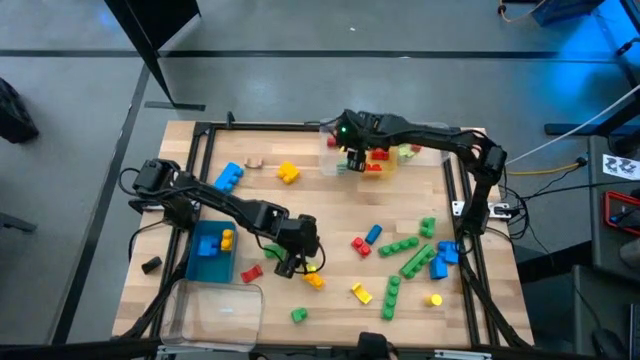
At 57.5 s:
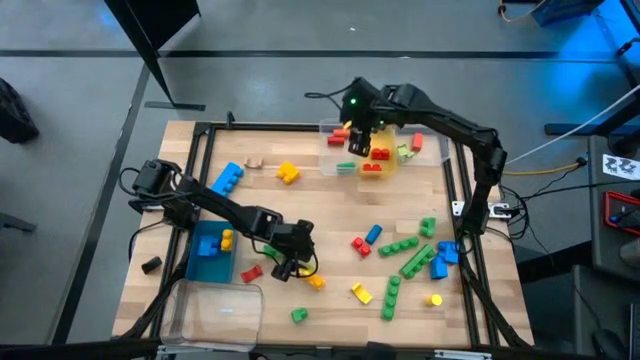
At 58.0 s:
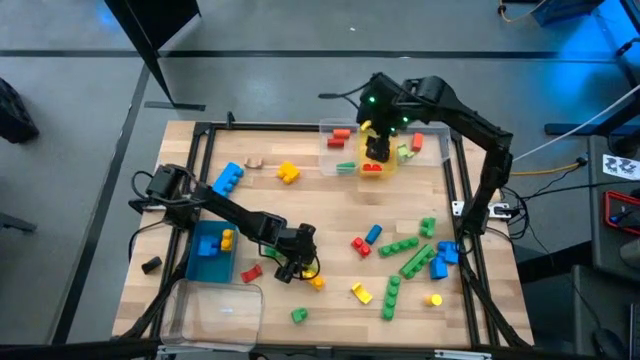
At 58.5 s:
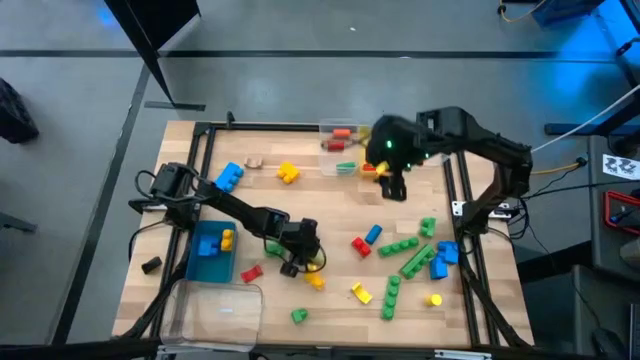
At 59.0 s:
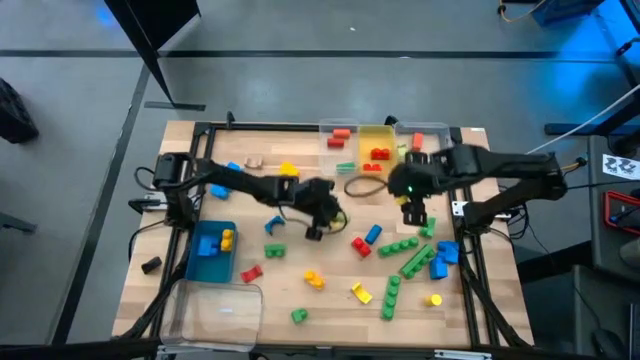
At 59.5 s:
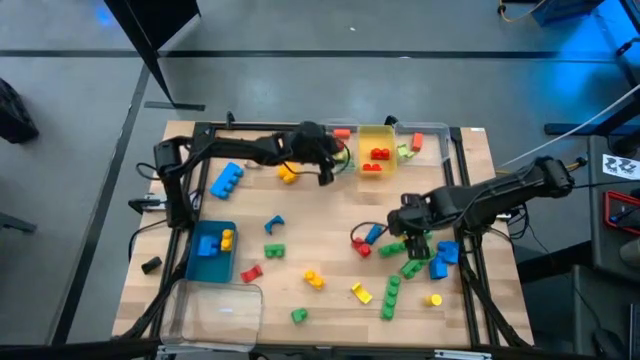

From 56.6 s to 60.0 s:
Task: Sort blocks by size
Put the light green cylindrical block into the top left transparent bin

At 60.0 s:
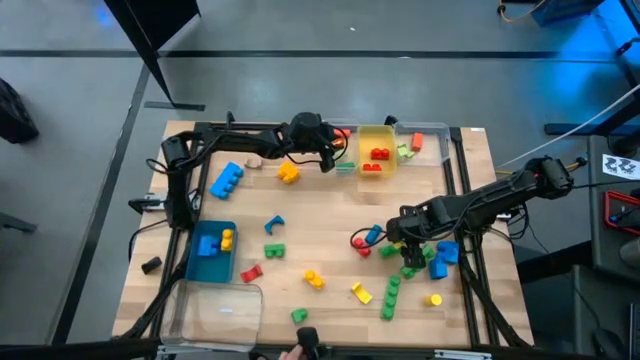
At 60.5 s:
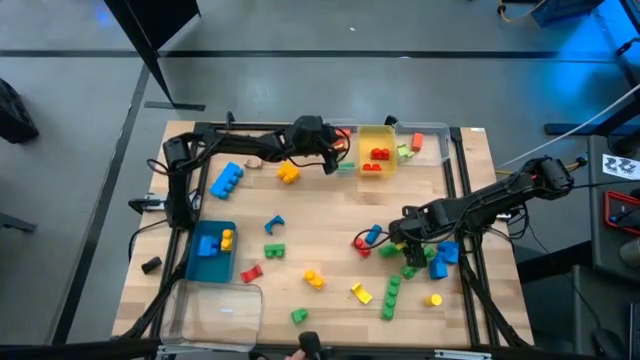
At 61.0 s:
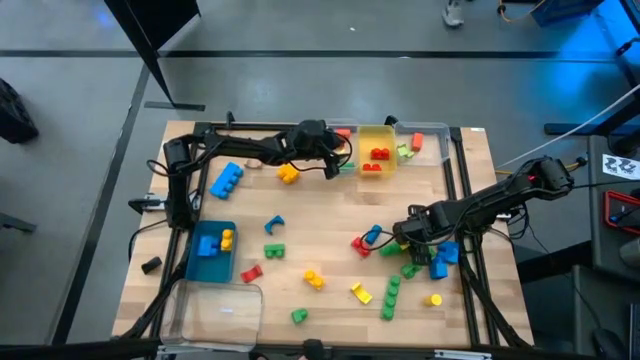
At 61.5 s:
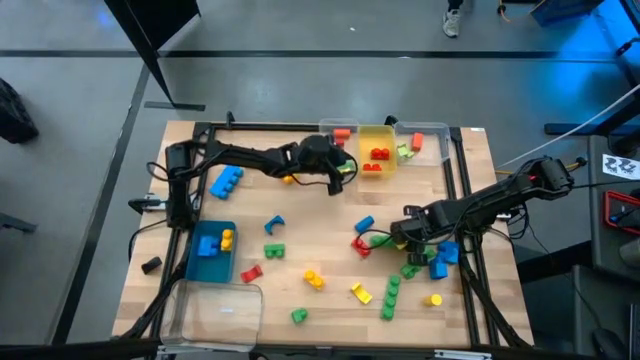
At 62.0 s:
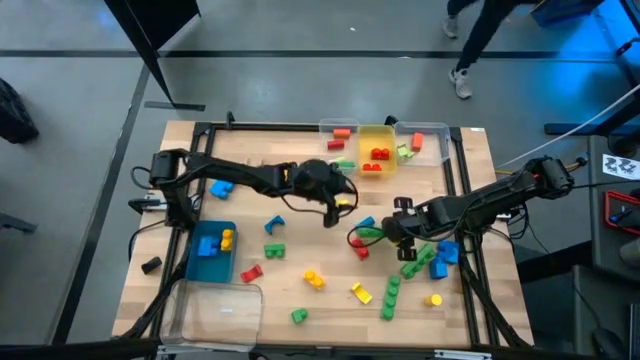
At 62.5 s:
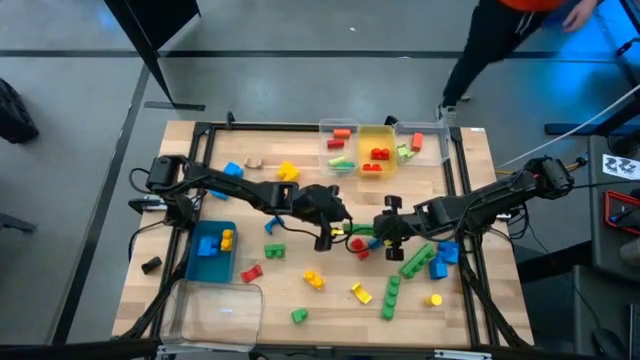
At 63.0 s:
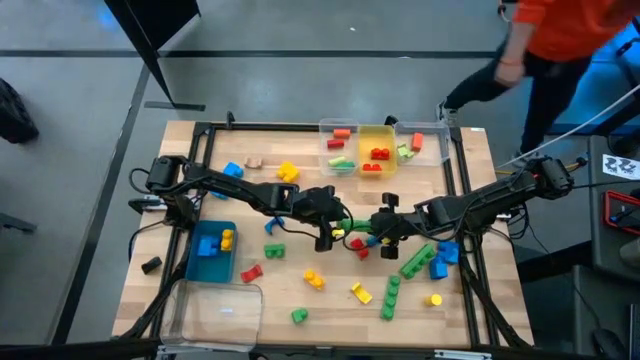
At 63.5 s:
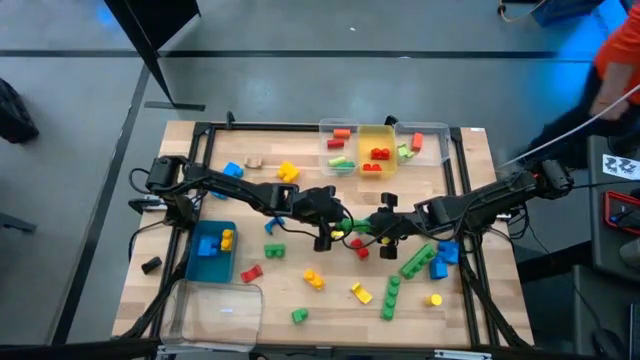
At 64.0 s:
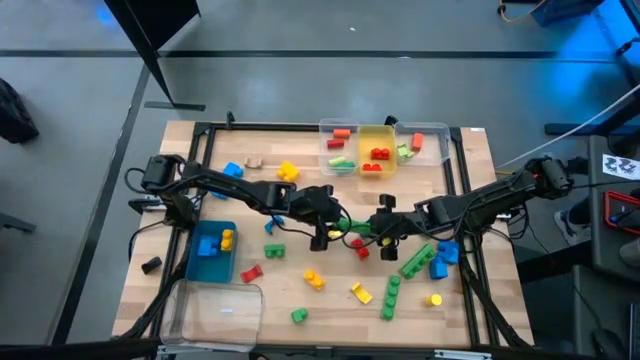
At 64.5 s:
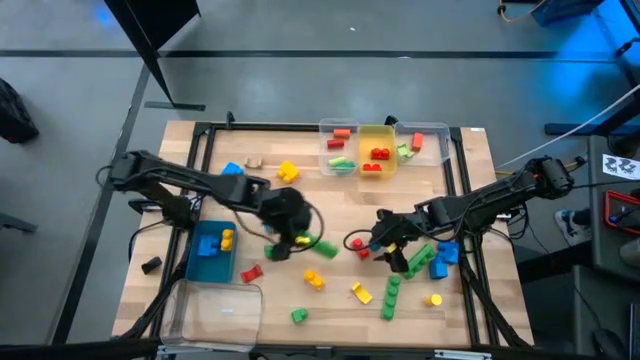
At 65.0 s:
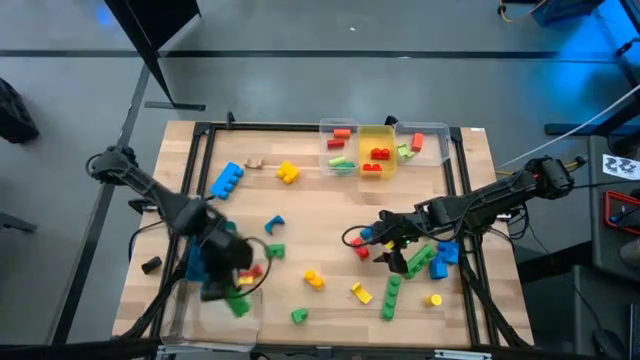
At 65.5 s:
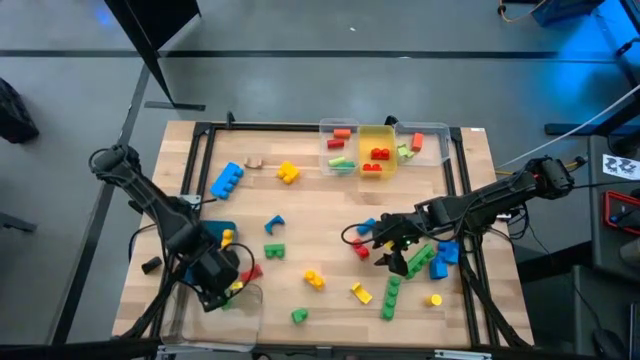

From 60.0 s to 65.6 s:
Put the green 4 stud game piece into the bottom transparent bin

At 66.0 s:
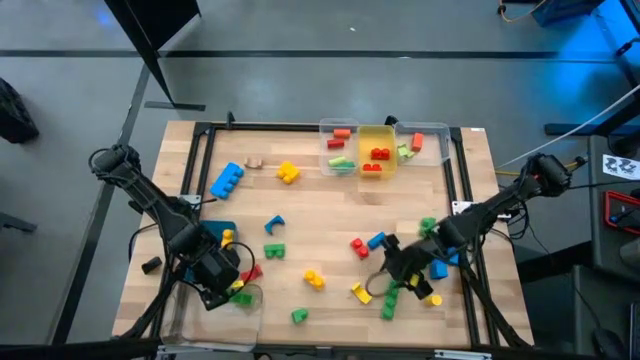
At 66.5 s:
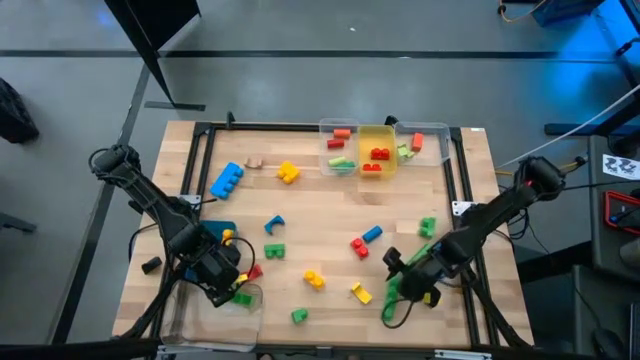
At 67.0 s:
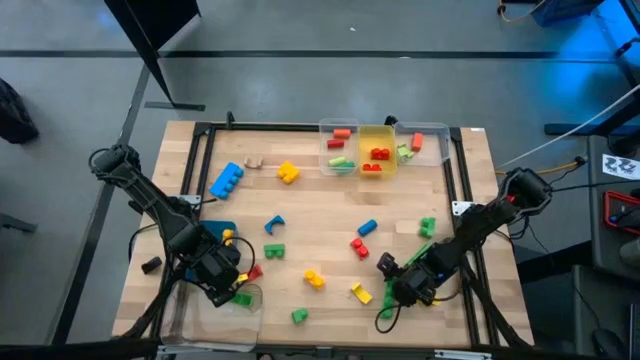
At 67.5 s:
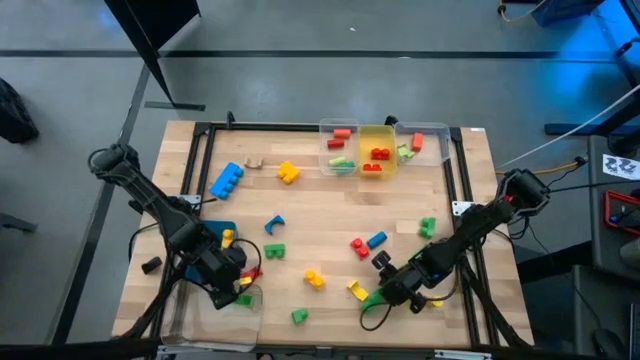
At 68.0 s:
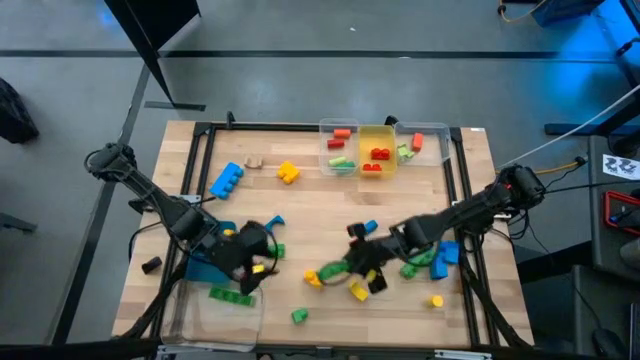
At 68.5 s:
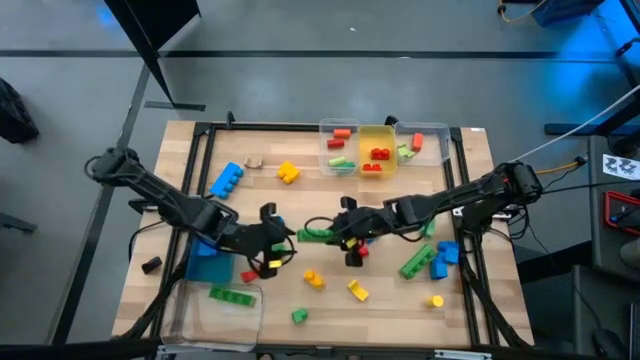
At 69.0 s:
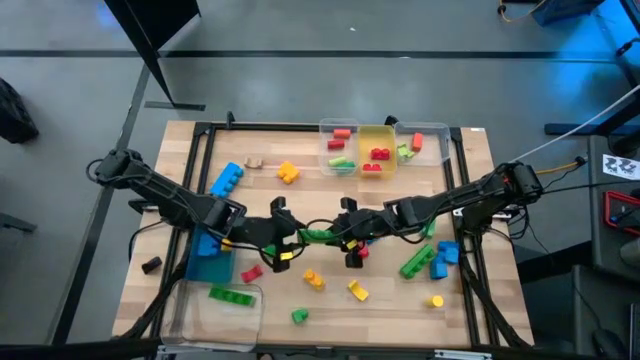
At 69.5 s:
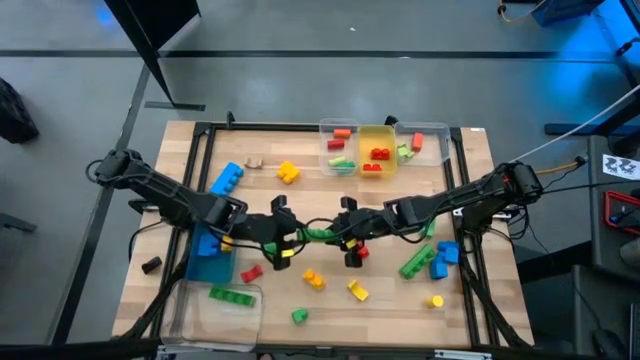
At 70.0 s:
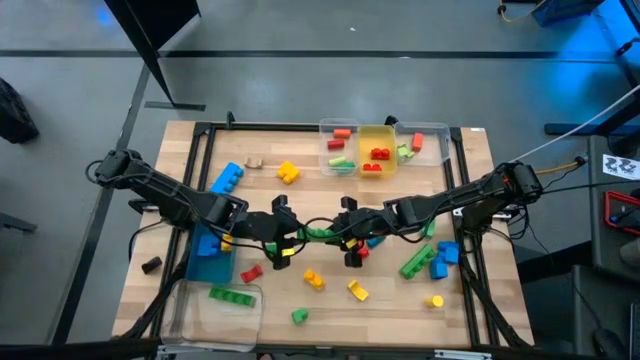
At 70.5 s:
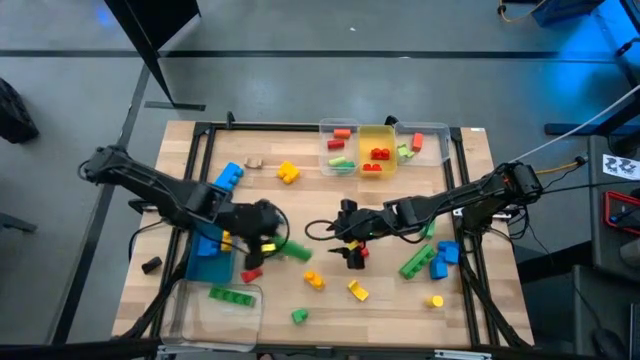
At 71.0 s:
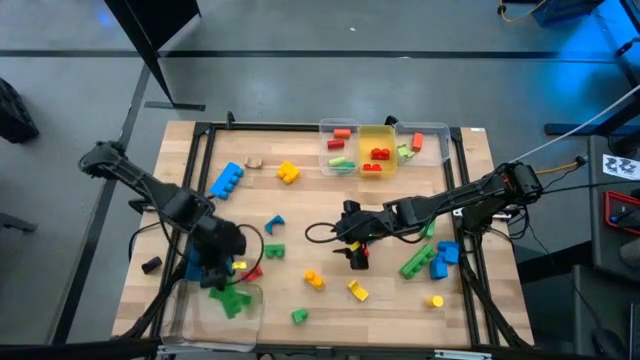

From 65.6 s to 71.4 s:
Put the green 4 stud game piece into the bottom transparent bin

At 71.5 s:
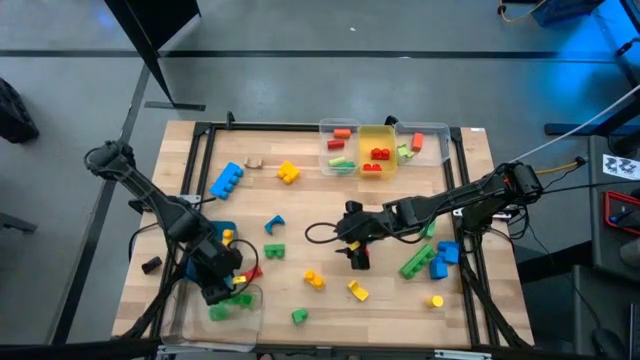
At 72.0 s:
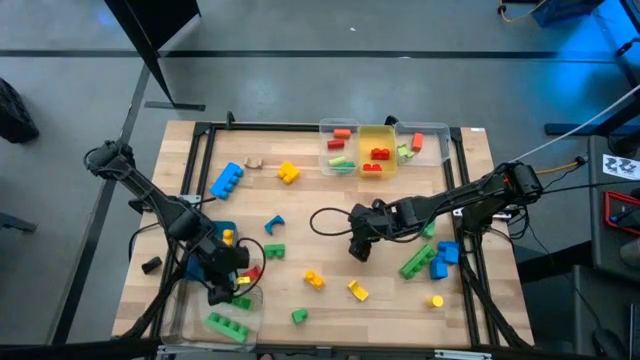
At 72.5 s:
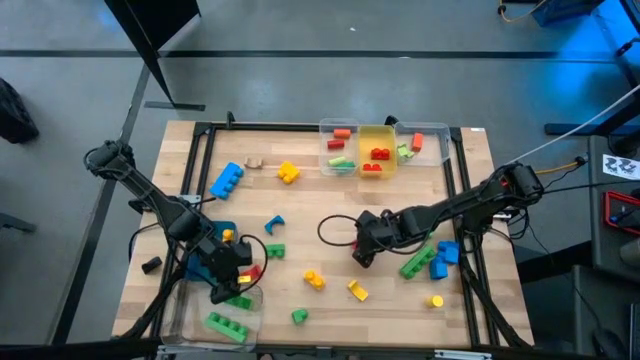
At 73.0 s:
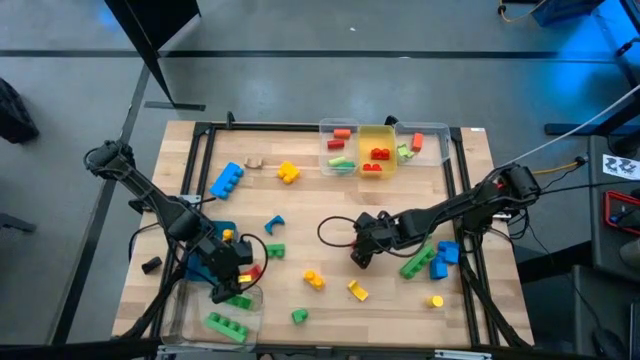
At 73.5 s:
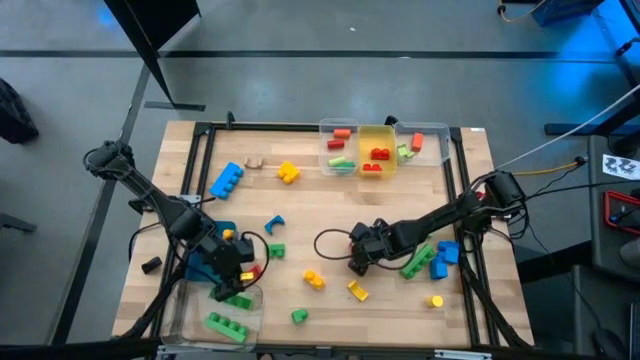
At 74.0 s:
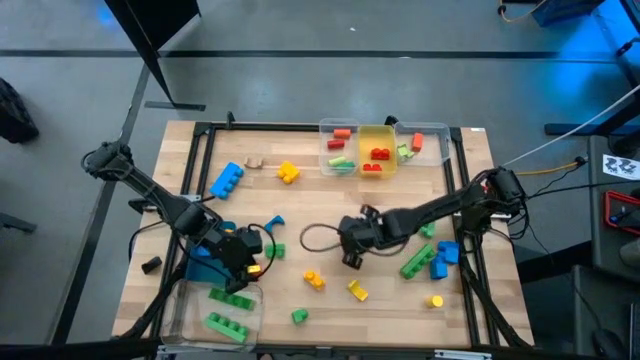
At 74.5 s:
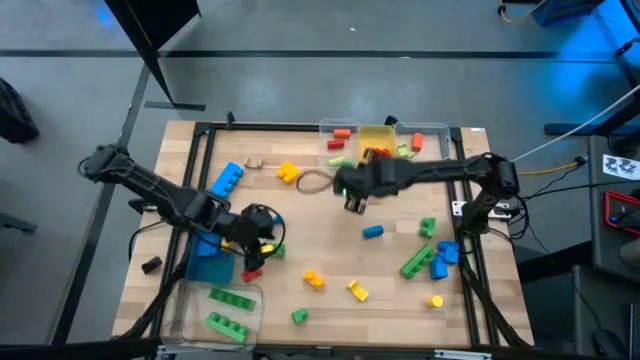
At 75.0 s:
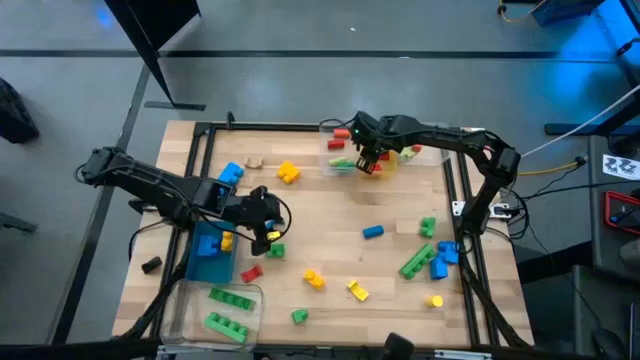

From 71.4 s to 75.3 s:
Put the red 2 stud game piece into the yellow bin

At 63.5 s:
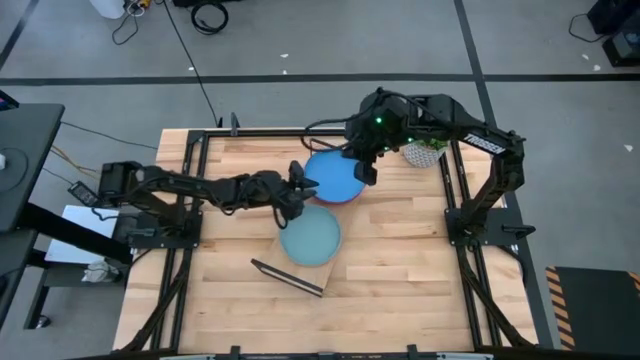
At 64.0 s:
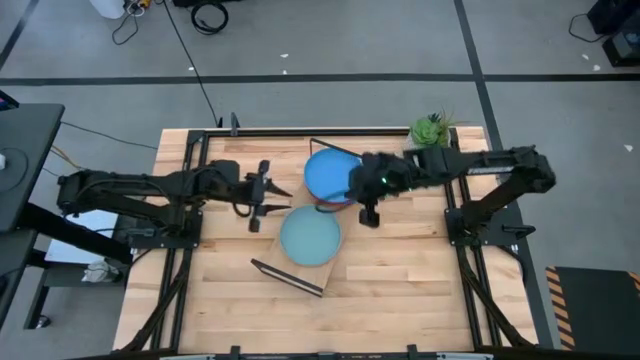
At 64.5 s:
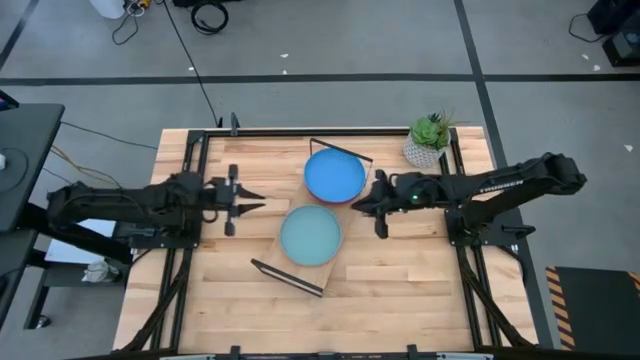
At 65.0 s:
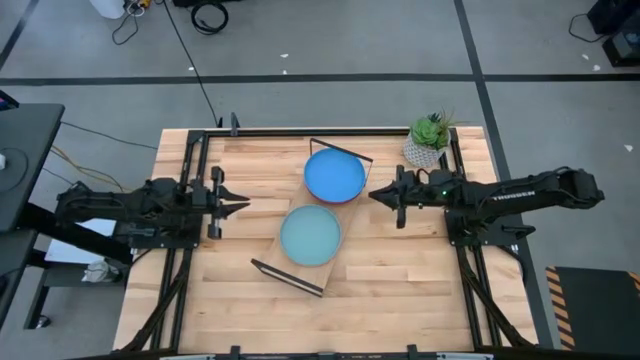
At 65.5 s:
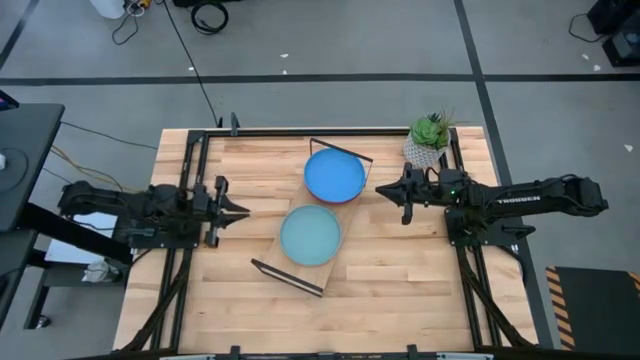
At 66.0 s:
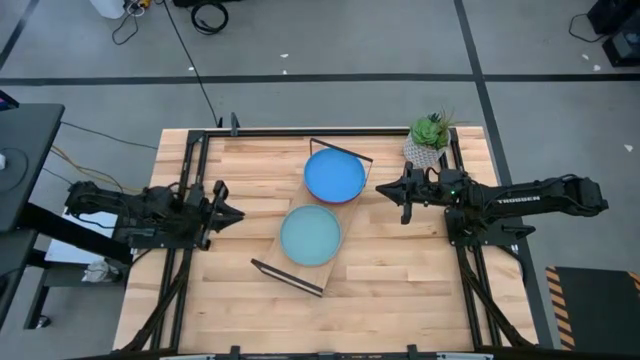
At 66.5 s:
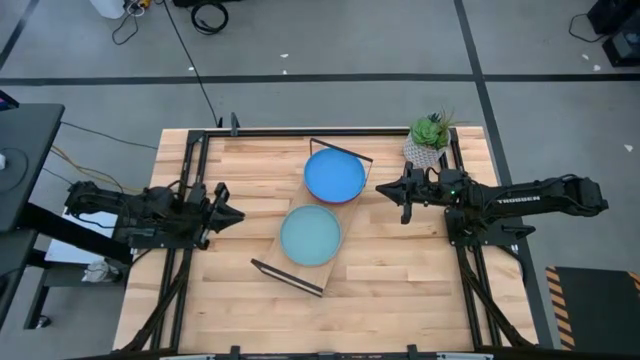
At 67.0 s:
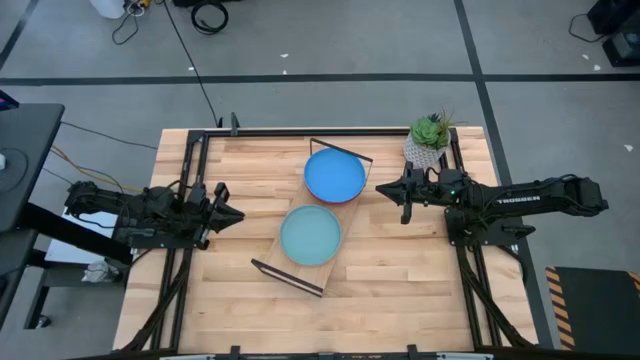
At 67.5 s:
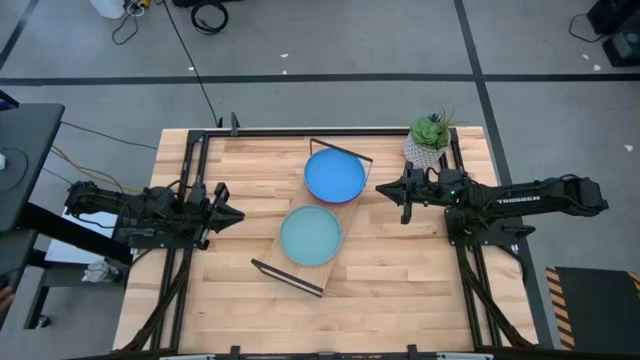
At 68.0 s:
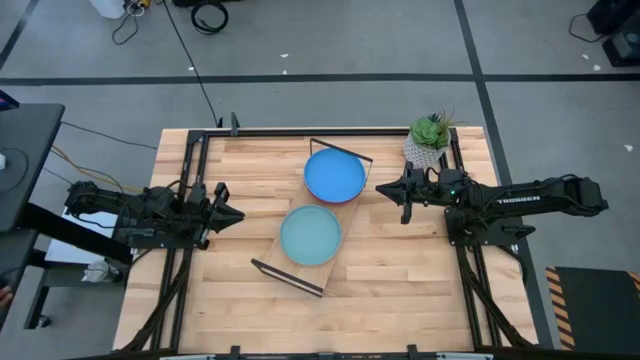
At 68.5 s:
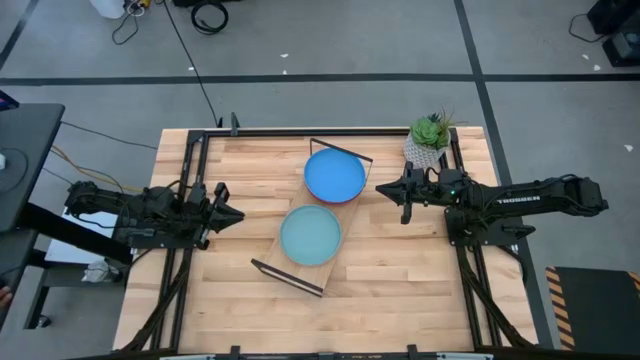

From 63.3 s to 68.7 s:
Task: Place and stack plates onto a shelf
Return to Home Position
